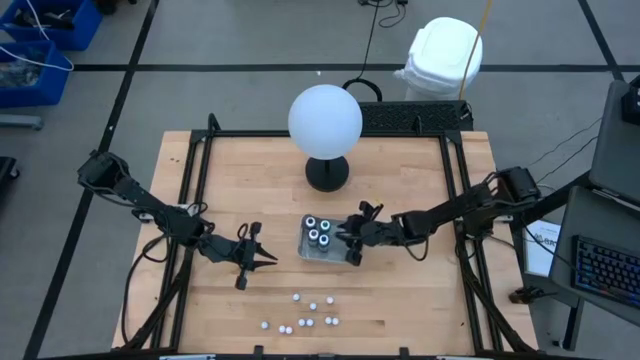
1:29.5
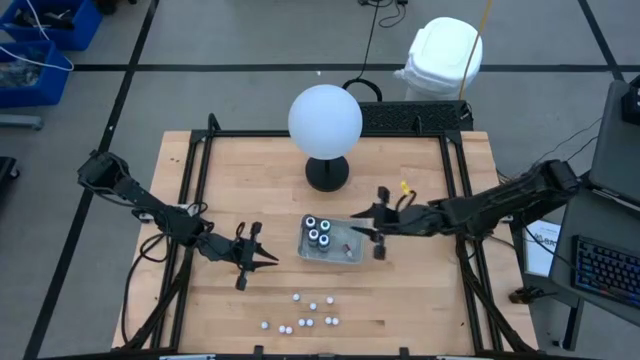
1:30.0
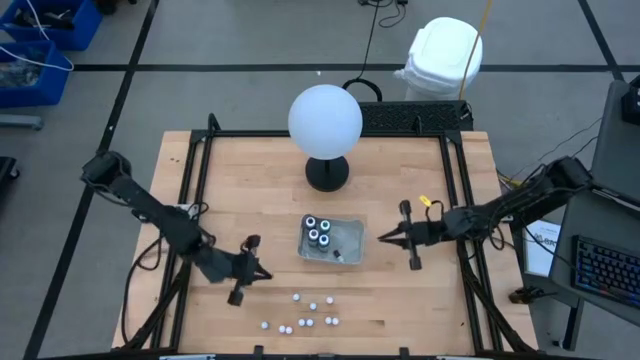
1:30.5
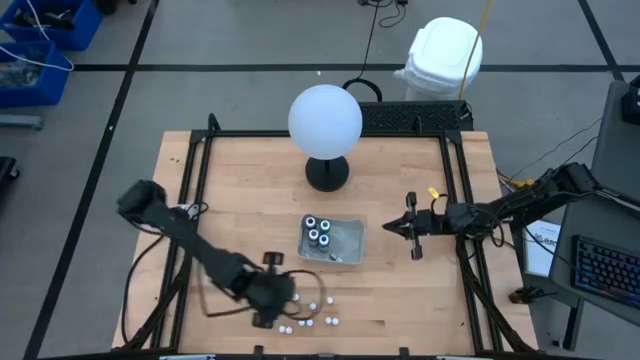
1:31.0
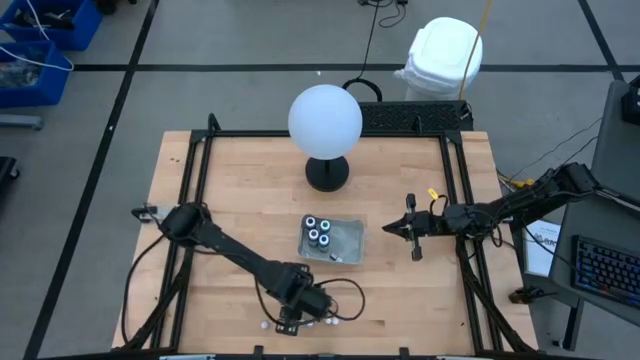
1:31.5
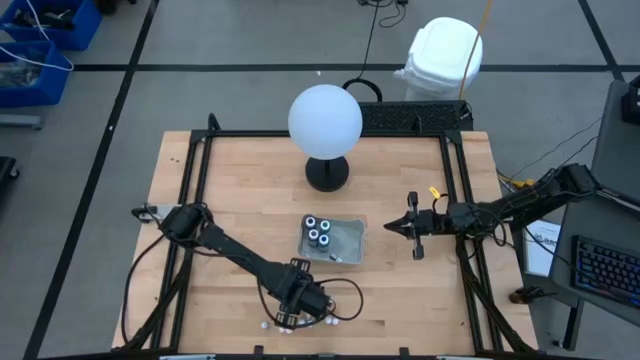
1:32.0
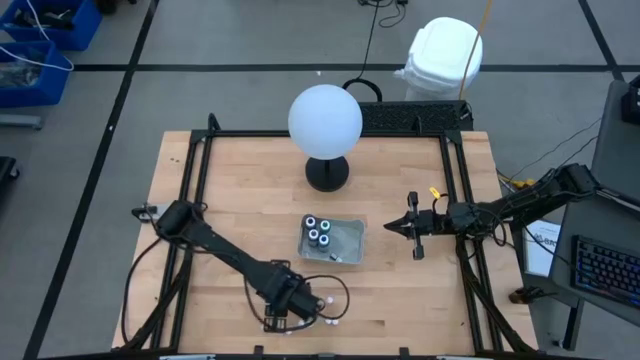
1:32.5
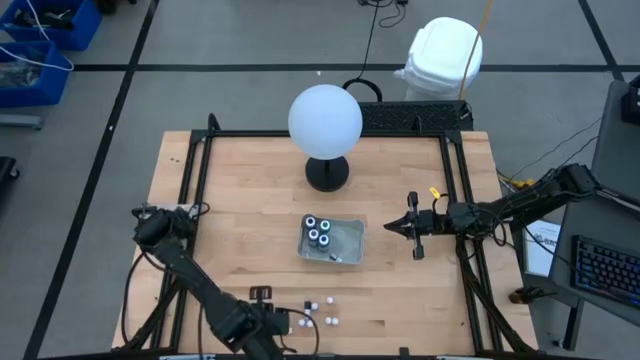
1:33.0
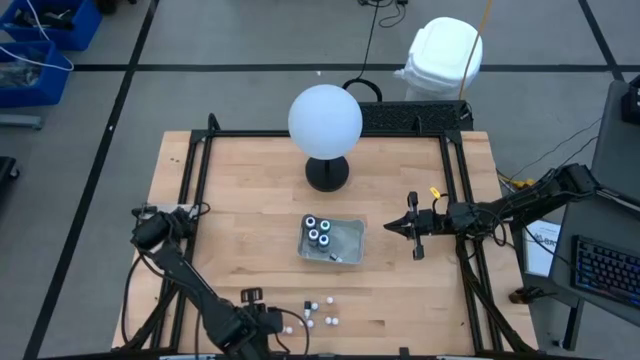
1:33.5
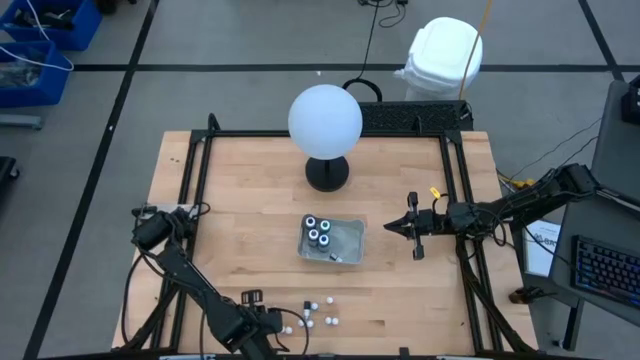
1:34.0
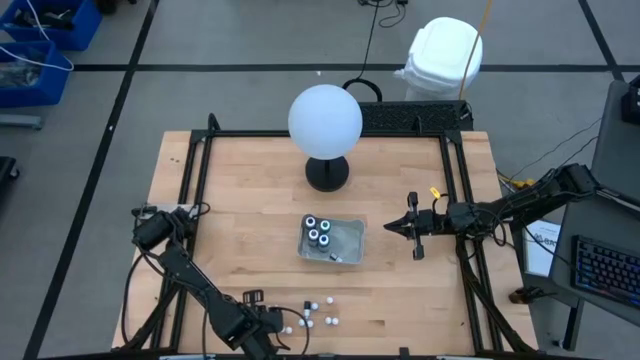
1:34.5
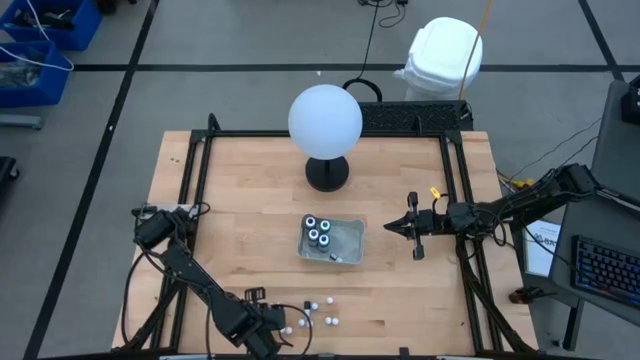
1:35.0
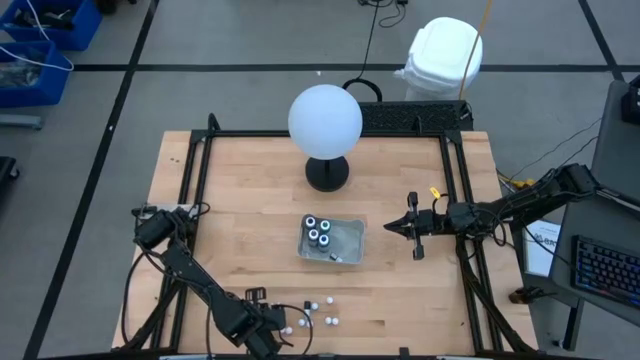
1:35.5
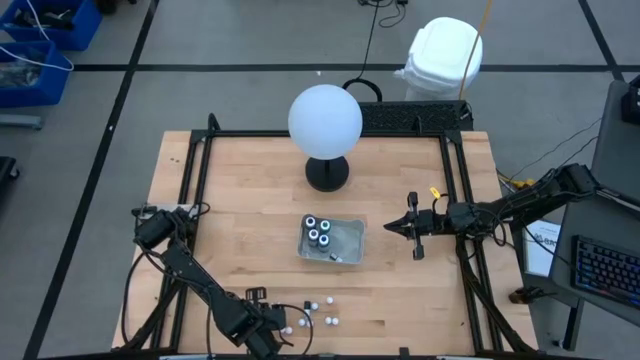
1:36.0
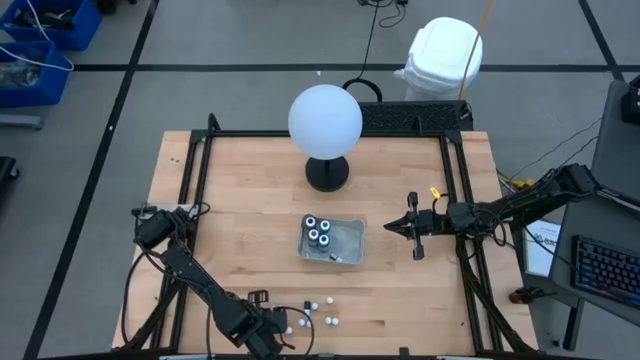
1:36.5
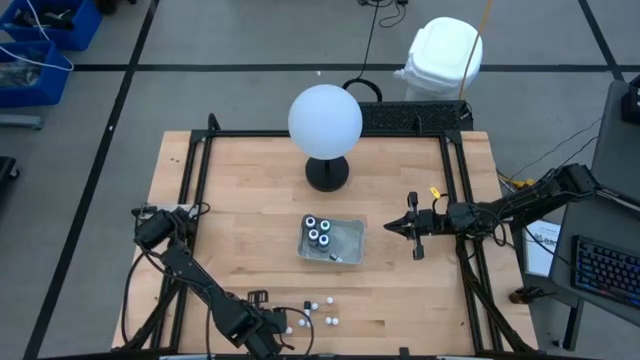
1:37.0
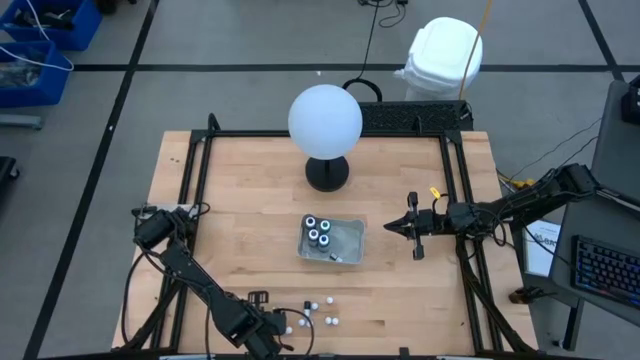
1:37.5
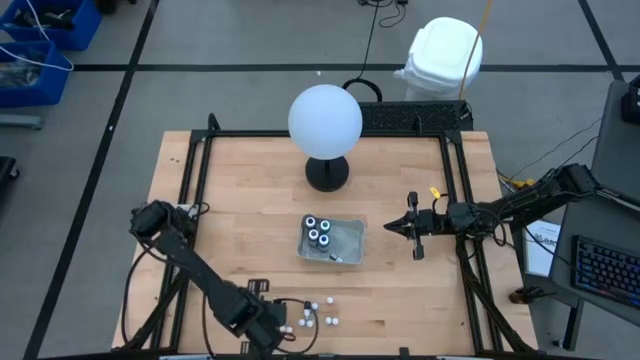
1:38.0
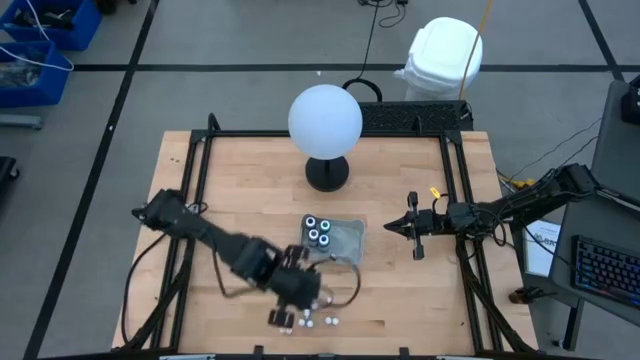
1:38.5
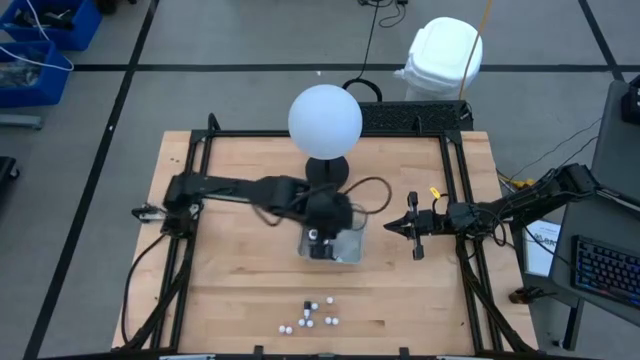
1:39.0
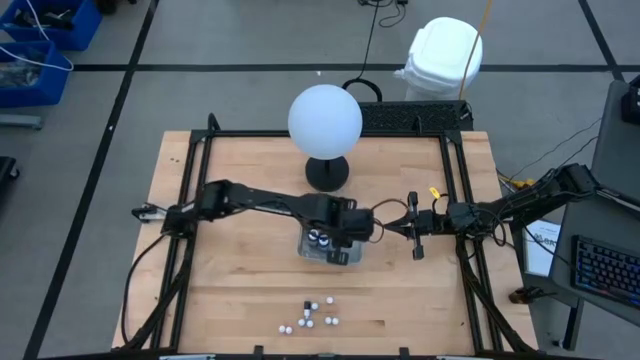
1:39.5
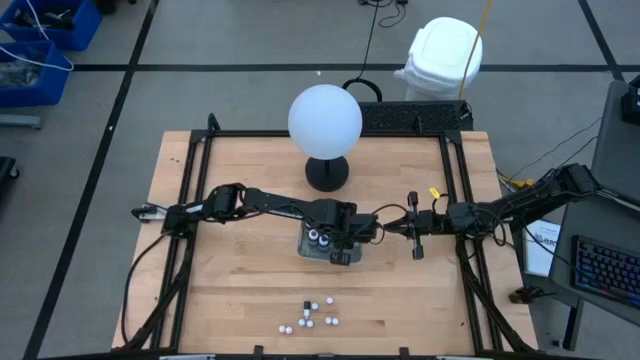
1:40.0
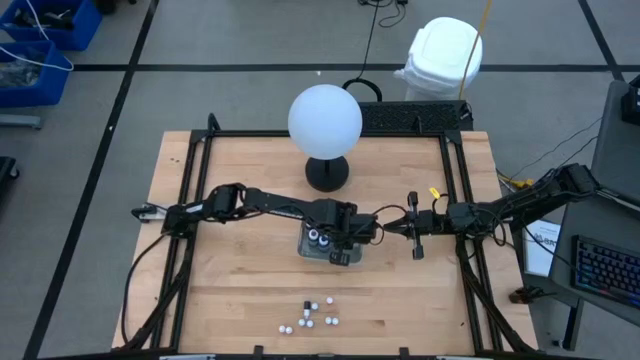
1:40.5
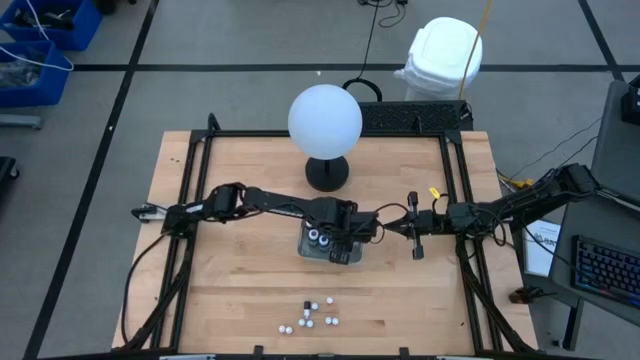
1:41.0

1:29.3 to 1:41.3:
Task: Pick & Place food coloring
Put the small black food coloring bottle into the gray bin

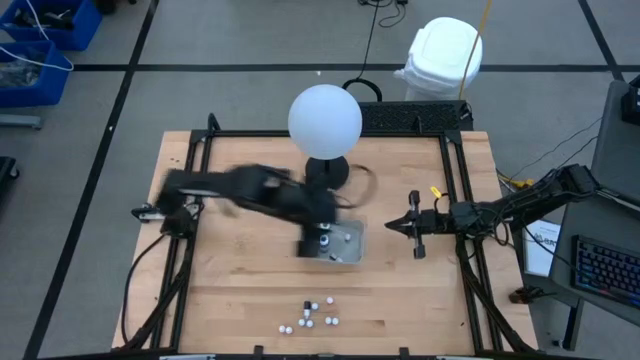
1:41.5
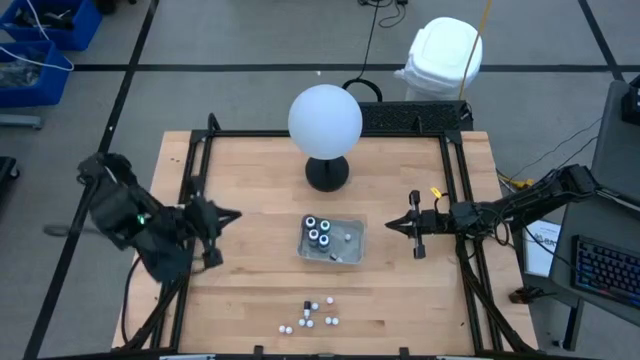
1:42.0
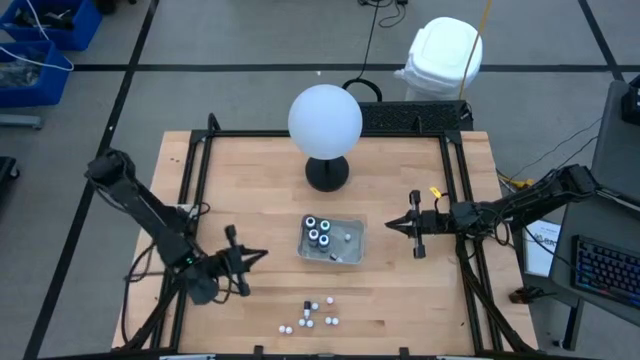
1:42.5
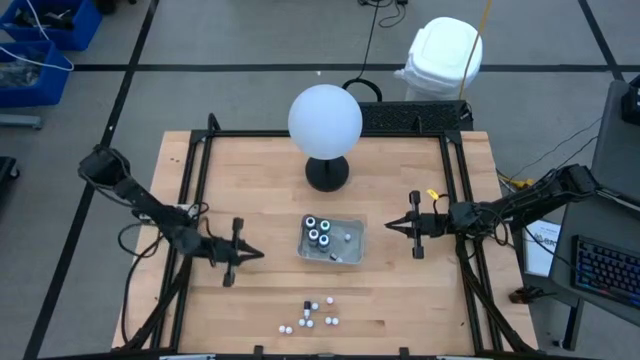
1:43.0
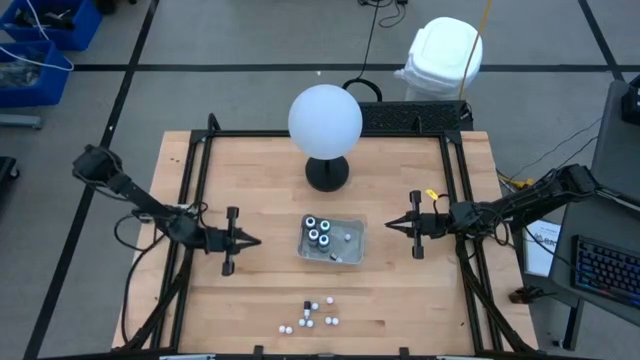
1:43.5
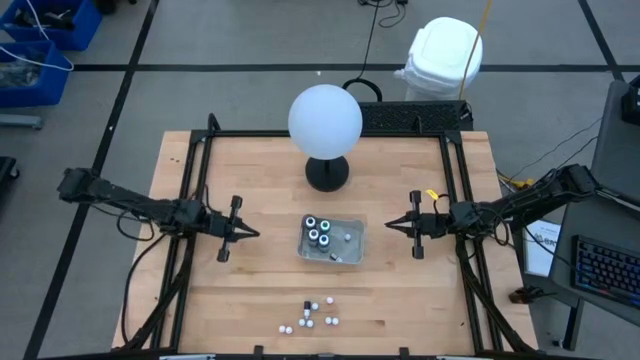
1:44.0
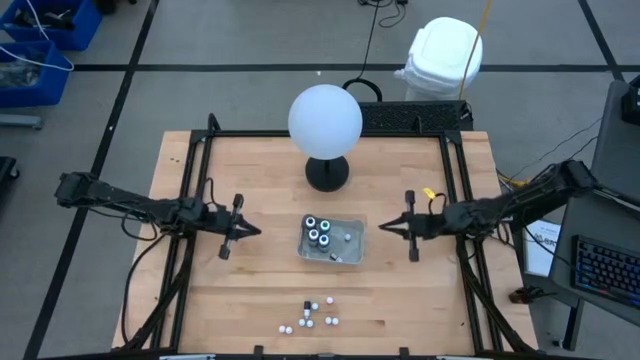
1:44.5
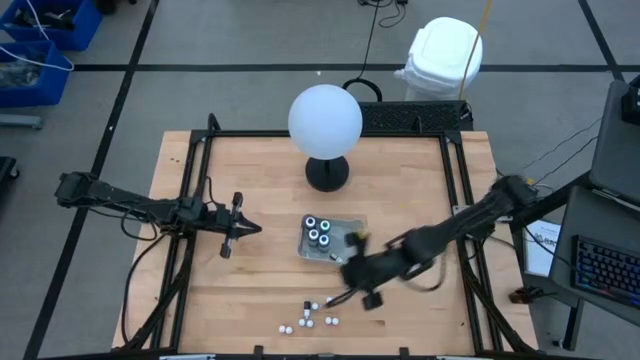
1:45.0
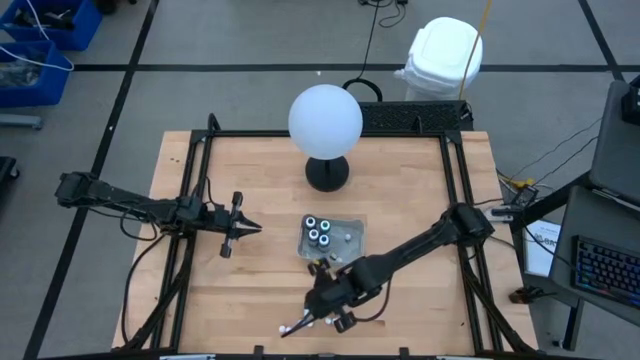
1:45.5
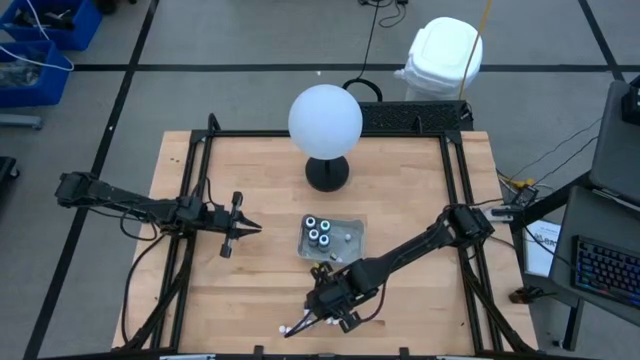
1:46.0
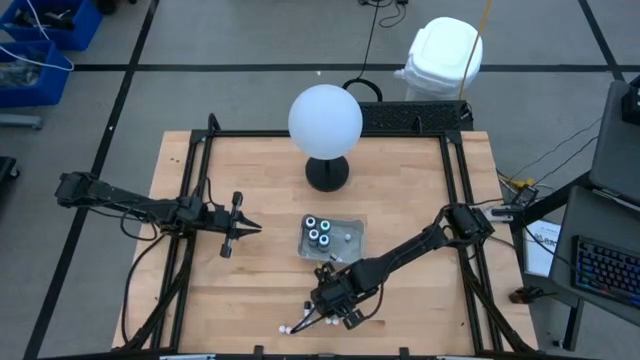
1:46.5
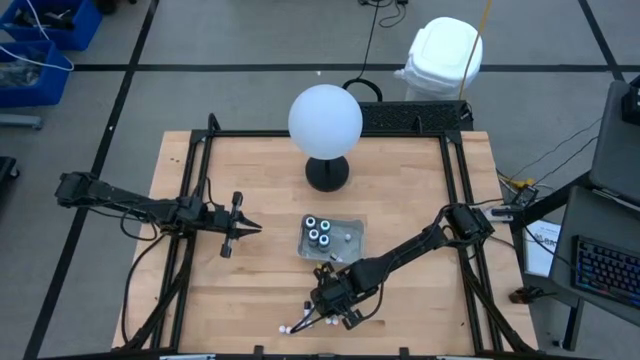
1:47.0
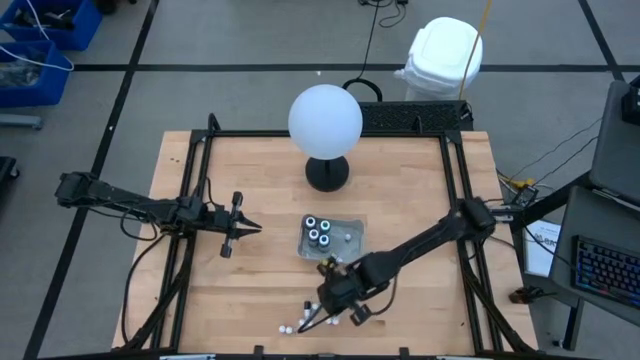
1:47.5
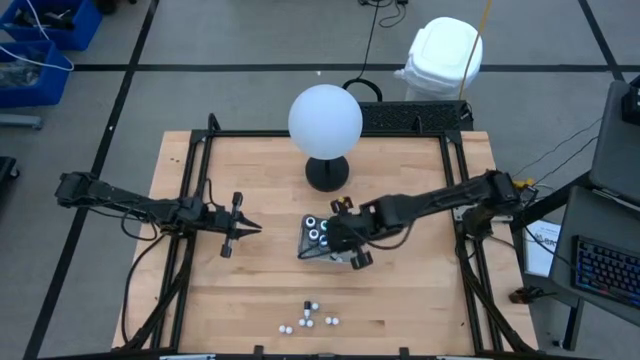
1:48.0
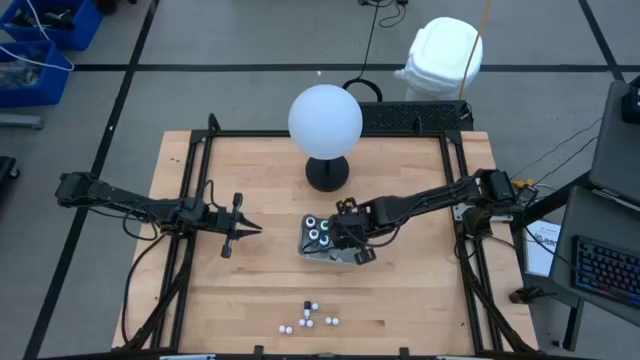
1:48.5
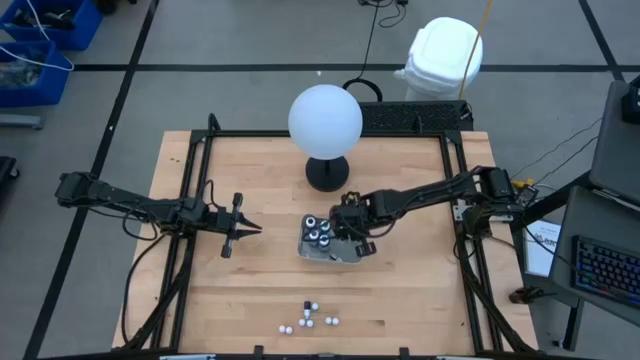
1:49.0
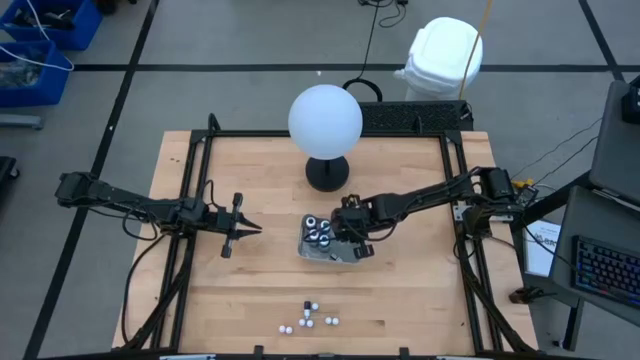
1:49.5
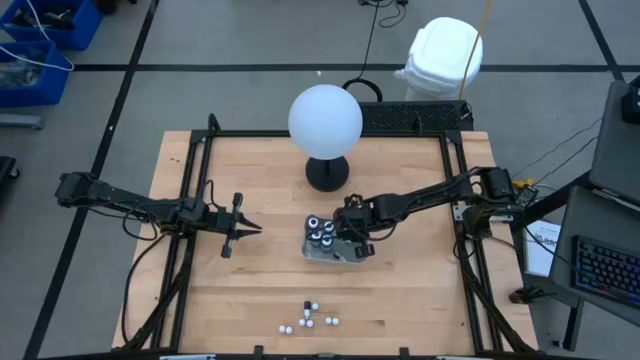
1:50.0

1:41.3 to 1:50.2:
Put the small orange food coloring bottle into the gray bin

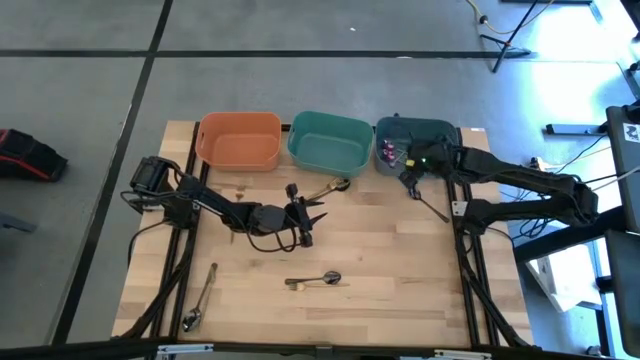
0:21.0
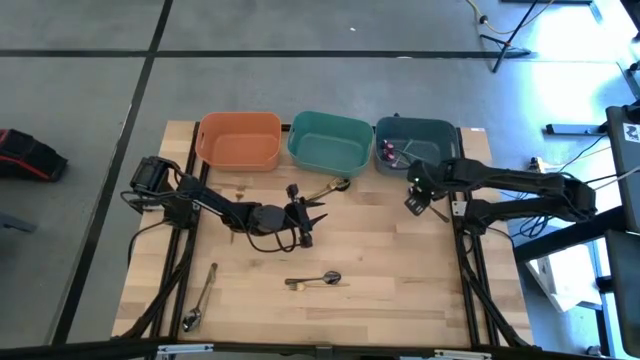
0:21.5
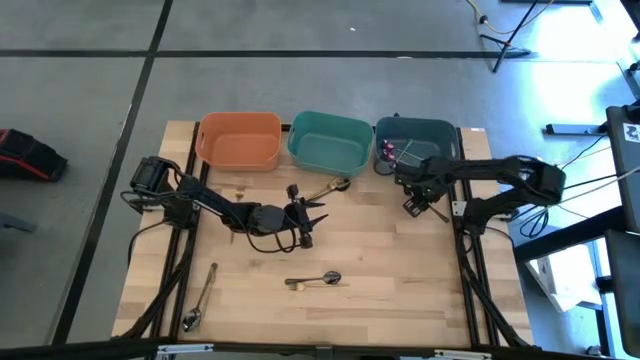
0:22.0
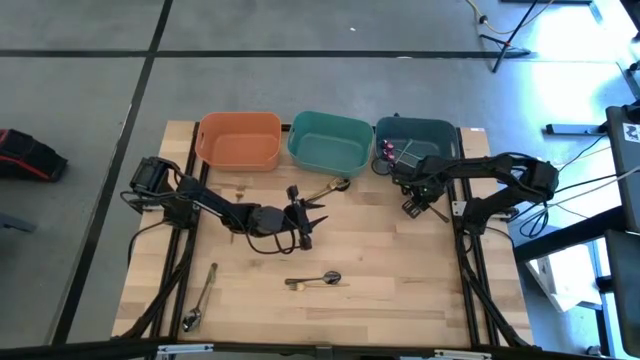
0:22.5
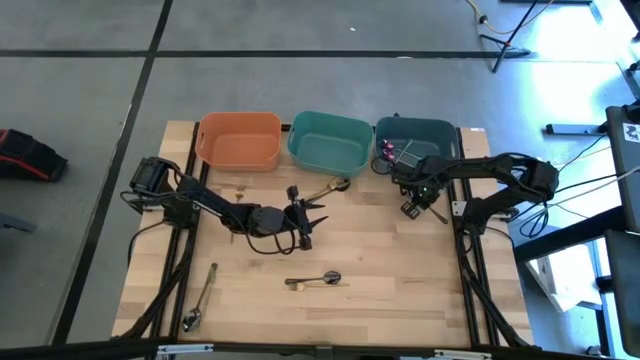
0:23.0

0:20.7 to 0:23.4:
Task: Sort silverware by color (type)
Put the black spoon into the green bin
